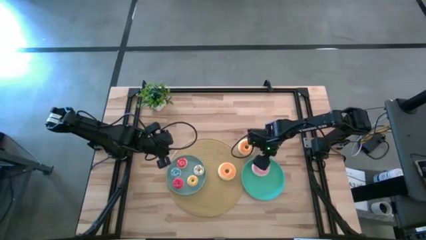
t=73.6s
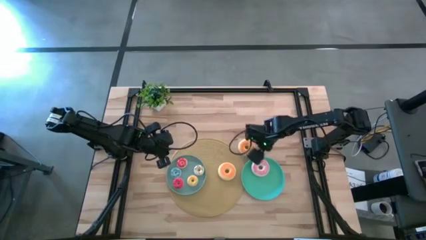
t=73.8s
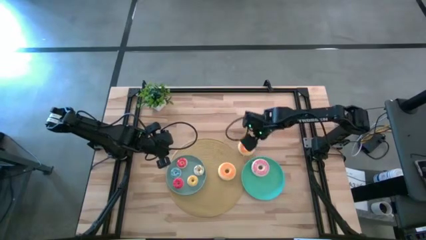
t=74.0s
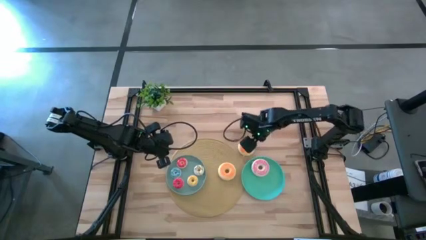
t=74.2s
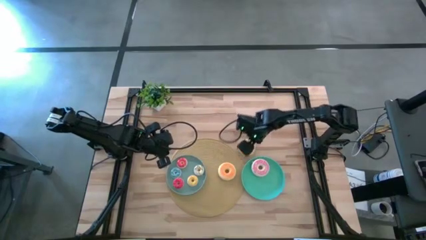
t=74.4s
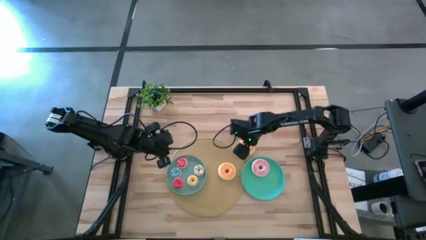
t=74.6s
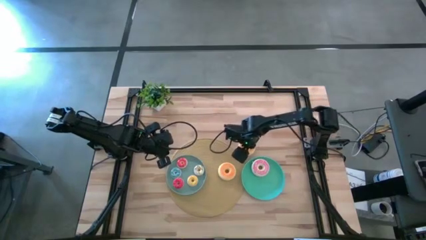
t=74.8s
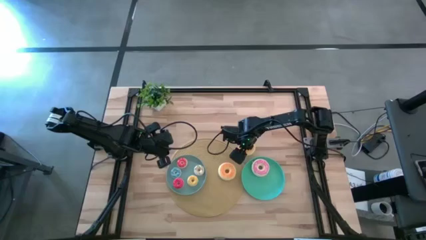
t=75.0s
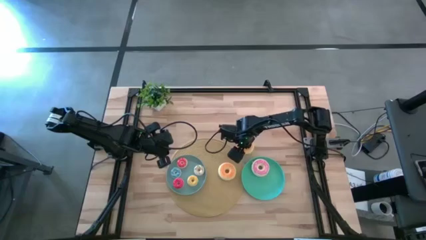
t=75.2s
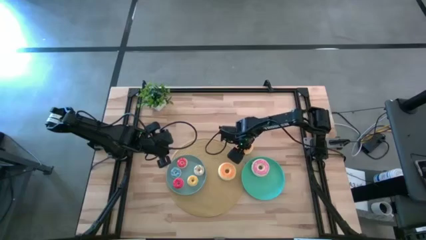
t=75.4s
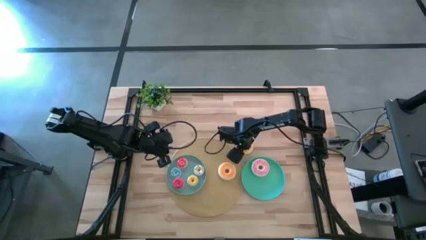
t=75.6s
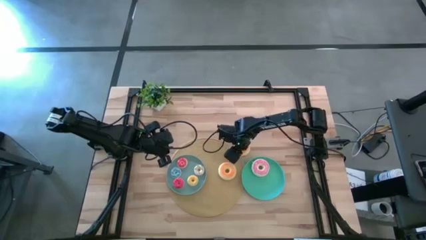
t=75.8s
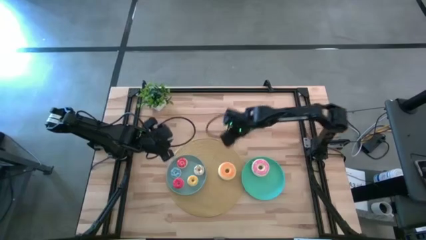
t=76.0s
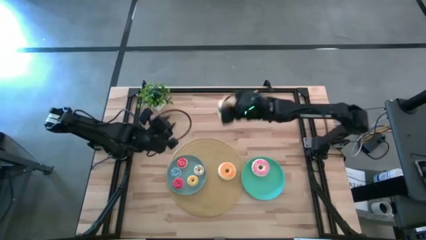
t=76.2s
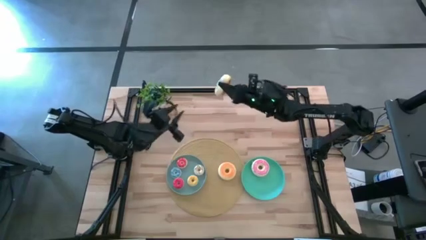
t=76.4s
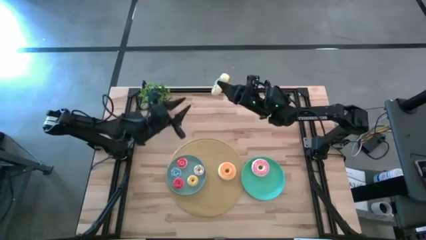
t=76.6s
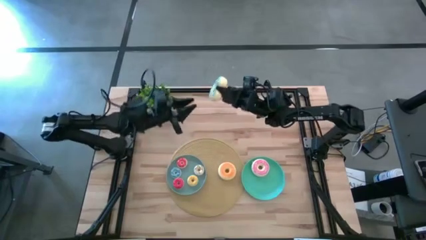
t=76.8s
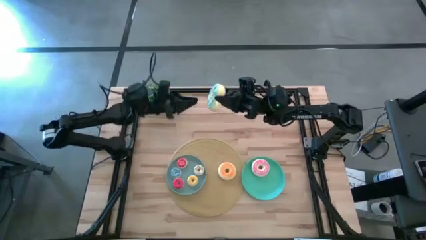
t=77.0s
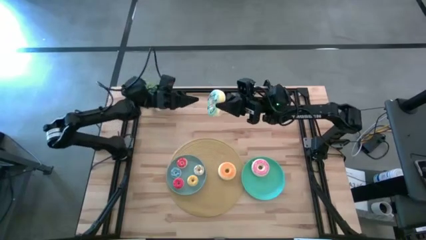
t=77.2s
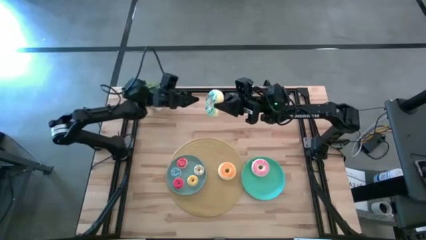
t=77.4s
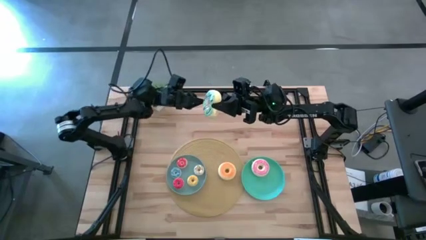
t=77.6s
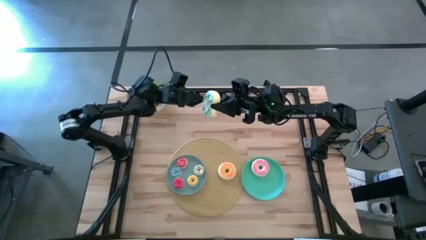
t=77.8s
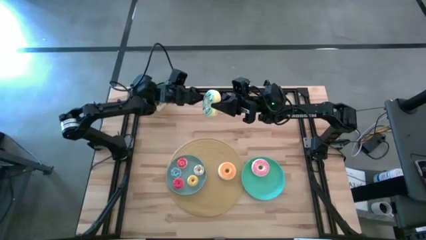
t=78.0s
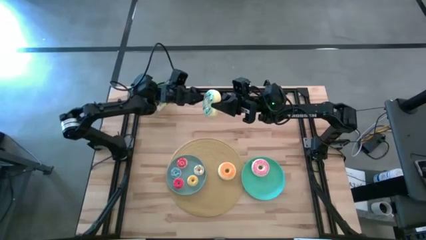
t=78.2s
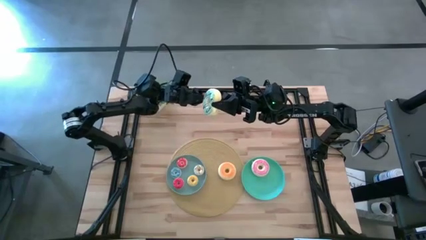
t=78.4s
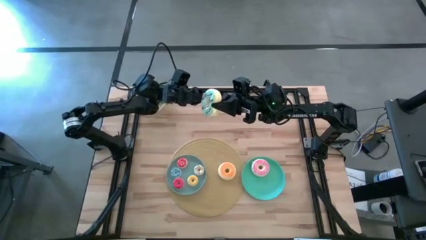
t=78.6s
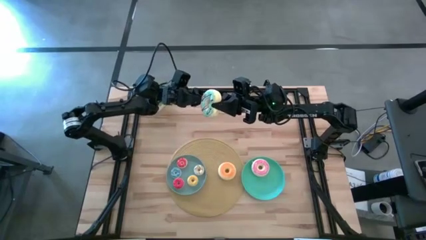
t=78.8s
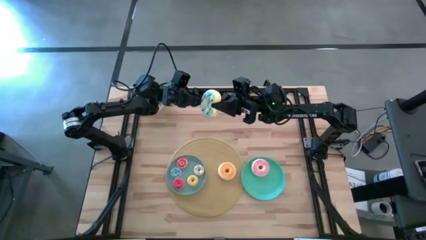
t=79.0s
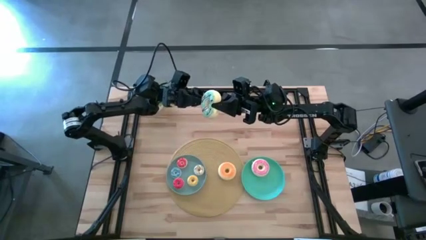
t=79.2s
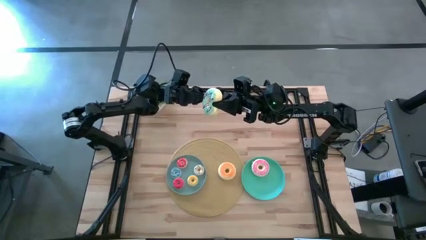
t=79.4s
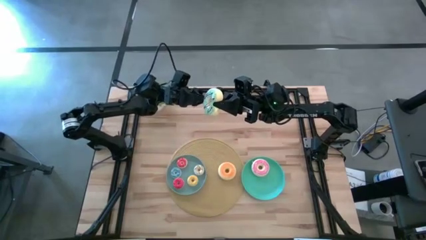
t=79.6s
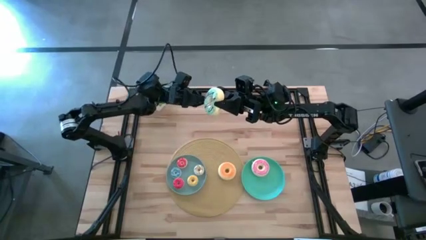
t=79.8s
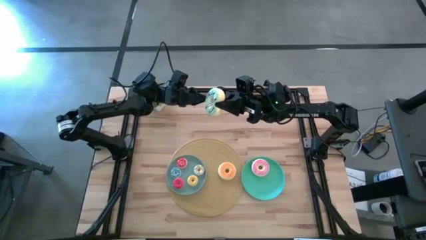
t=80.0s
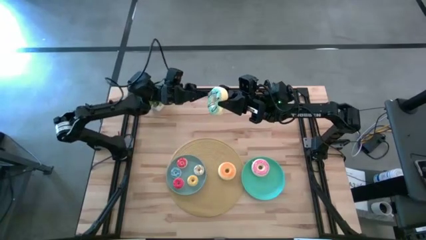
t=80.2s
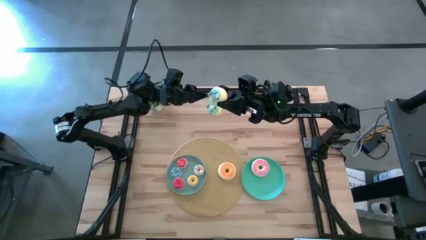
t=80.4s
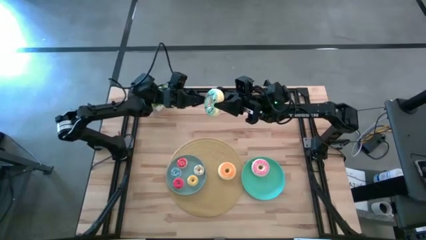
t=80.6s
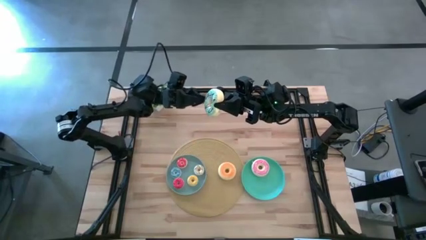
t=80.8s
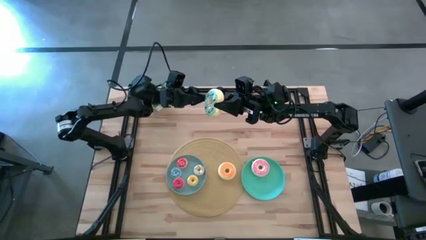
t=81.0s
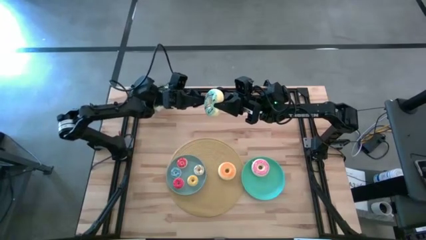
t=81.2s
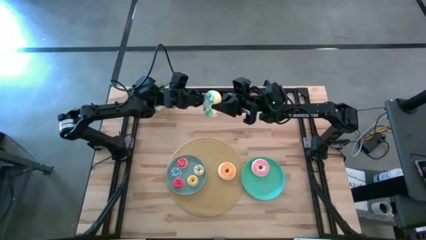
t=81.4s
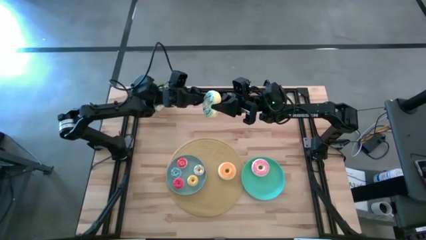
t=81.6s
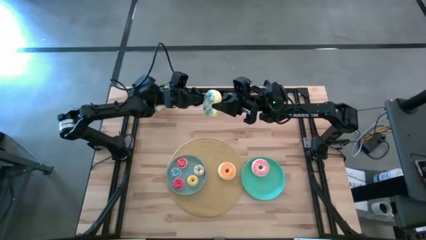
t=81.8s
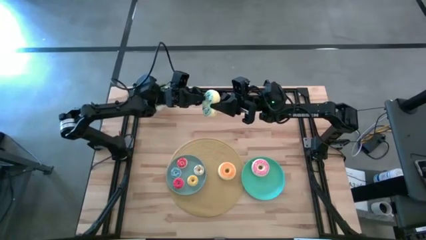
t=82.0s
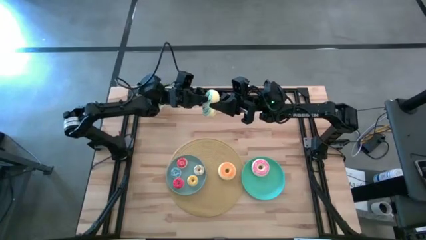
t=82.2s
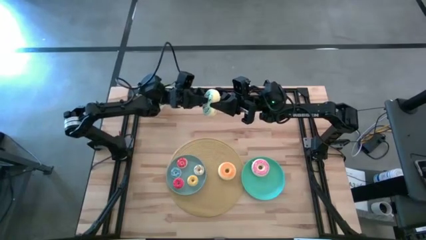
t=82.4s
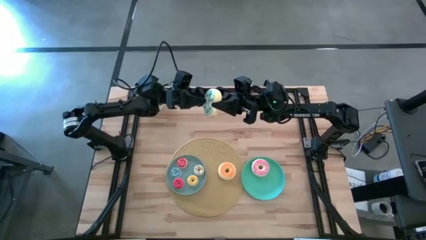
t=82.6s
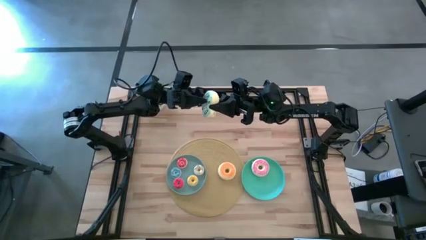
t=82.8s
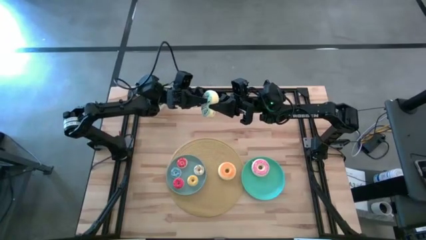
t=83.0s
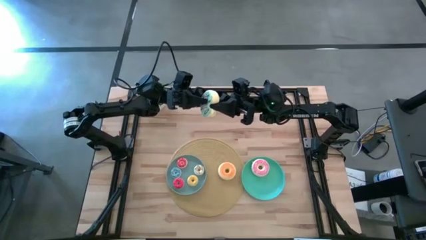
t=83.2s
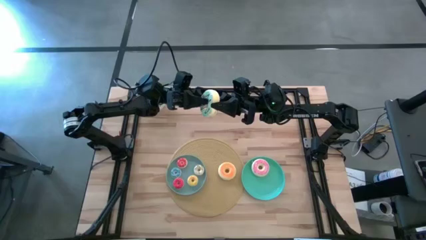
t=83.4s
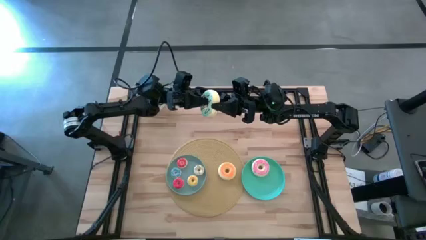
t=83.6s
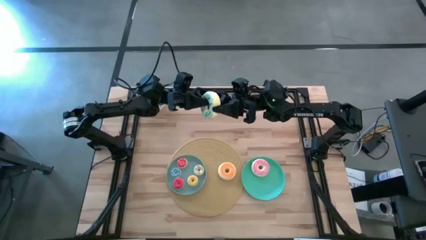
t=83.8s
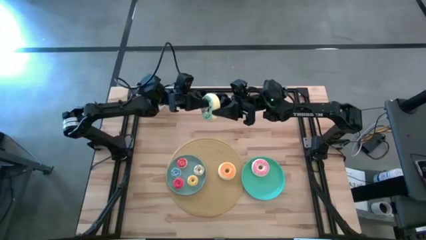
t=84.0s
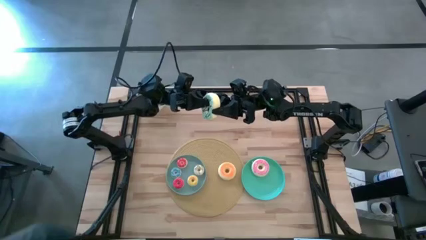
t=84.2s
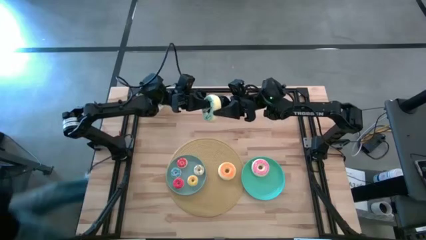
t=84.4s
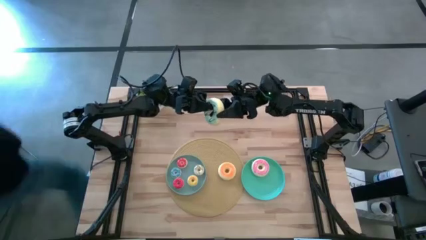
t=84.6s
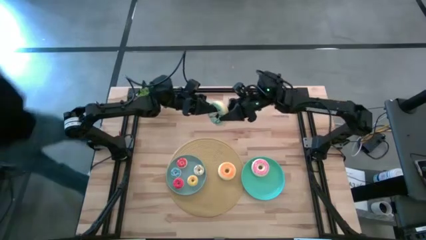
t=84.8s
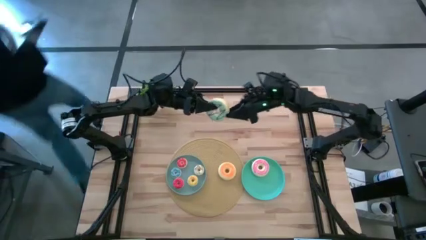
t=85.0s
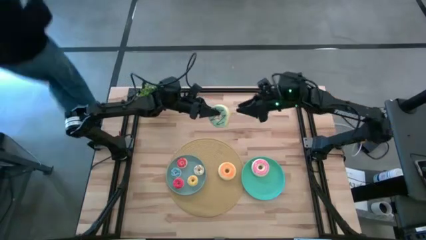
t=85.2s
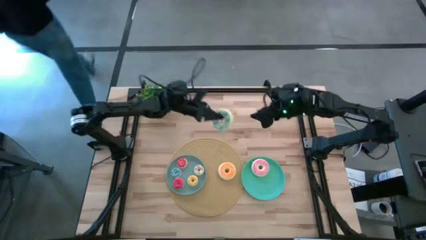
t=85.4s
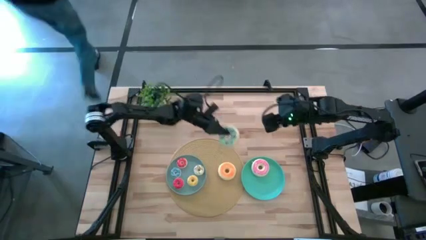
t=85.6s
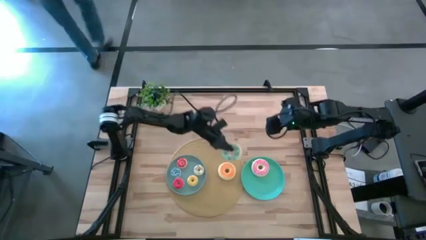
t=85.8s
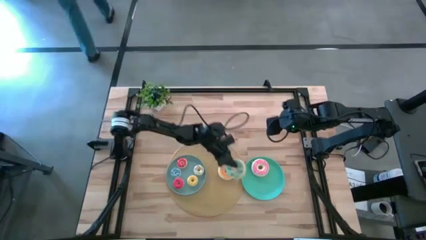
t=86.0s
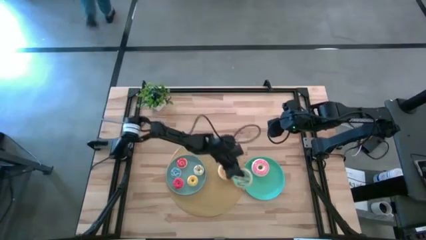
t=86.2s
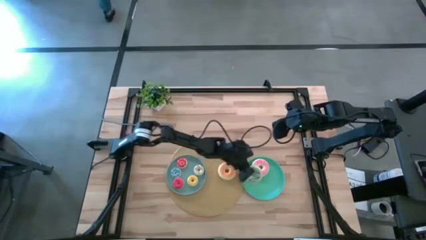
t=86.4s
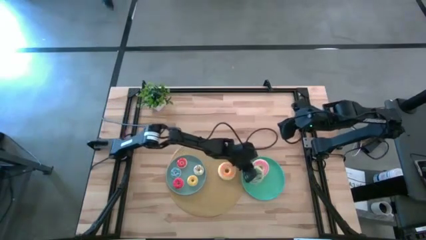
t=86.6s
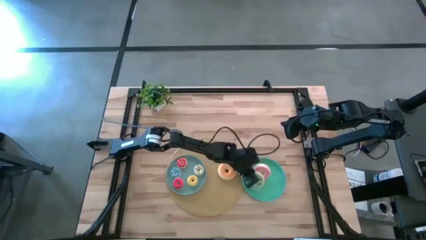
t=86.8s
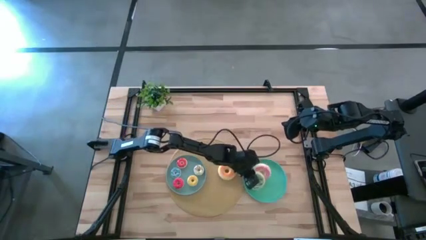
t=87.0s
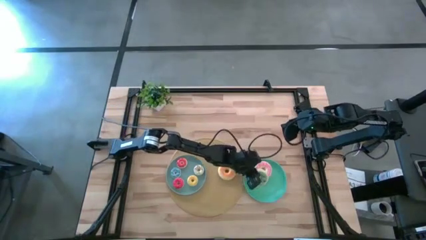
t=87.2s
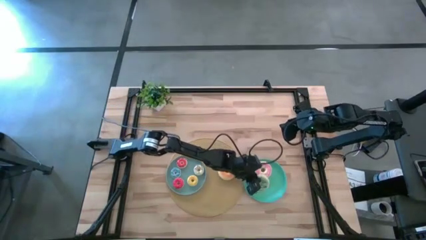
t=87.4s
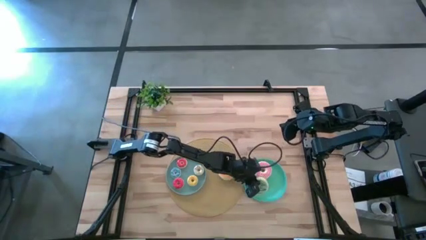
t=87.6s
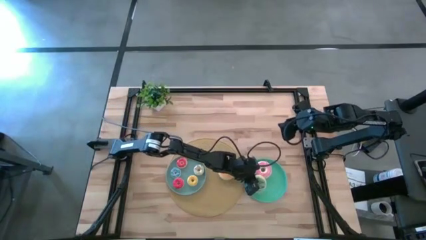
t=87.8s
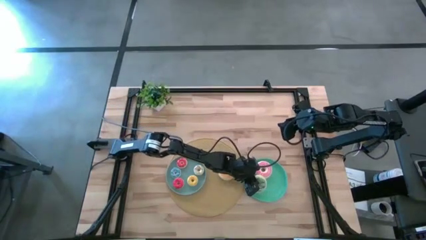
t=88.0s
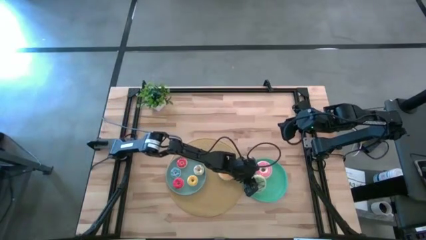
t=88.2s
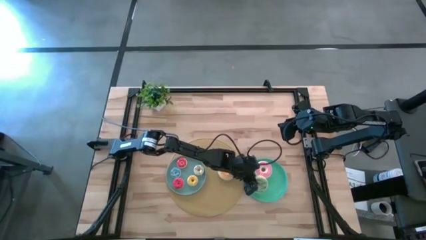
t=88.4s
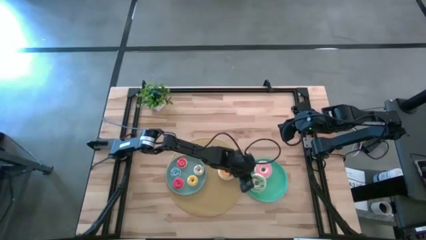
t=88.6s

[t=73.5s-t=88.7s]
Task: Pick & Place donuts
Put the large blue donut on the green plate
